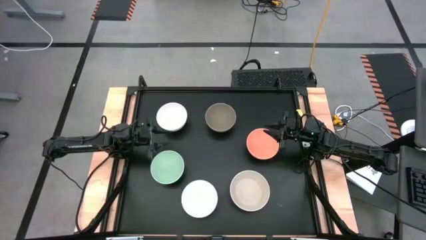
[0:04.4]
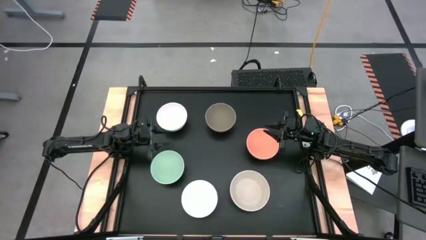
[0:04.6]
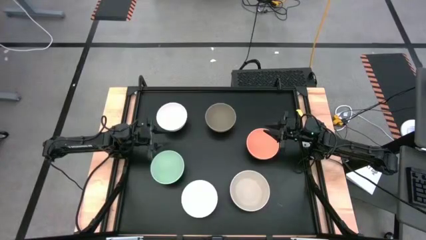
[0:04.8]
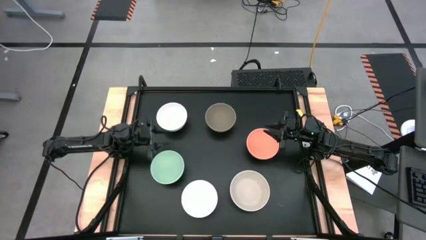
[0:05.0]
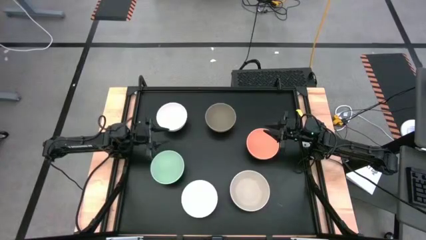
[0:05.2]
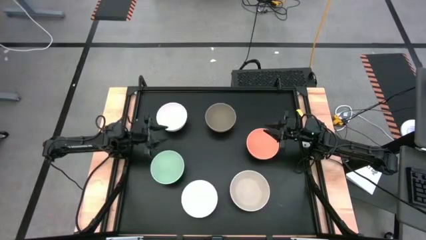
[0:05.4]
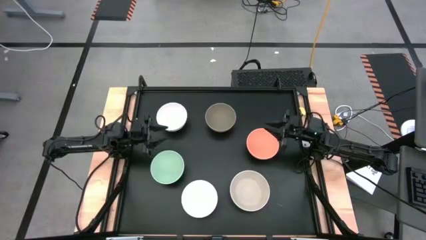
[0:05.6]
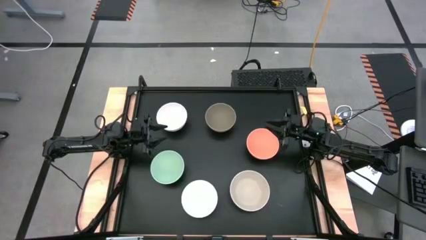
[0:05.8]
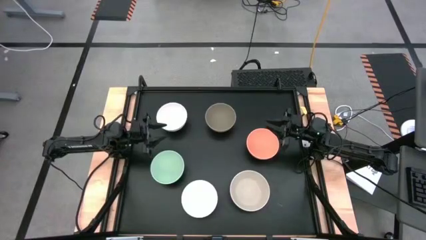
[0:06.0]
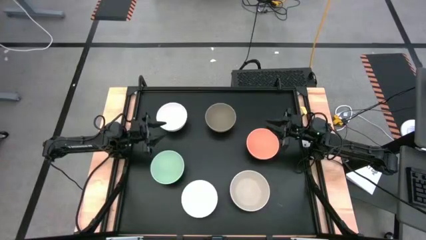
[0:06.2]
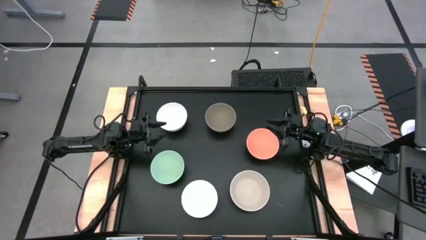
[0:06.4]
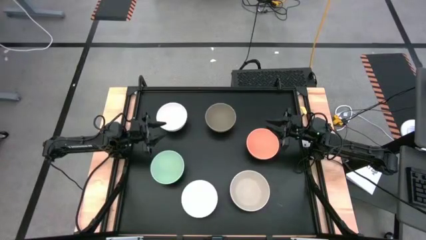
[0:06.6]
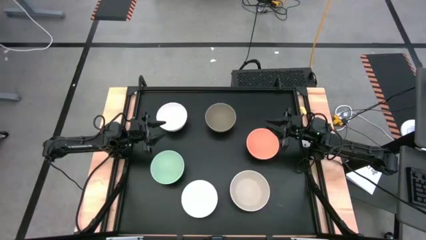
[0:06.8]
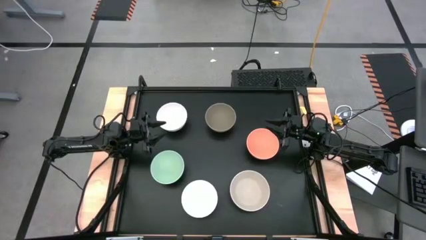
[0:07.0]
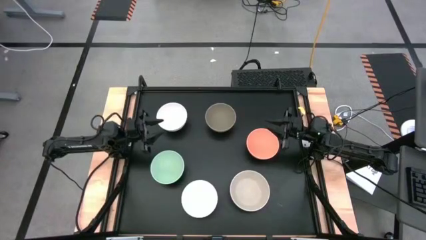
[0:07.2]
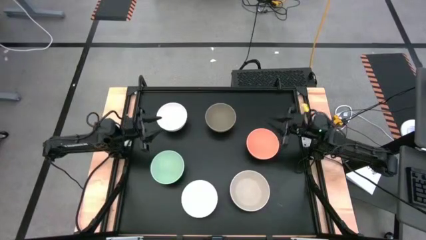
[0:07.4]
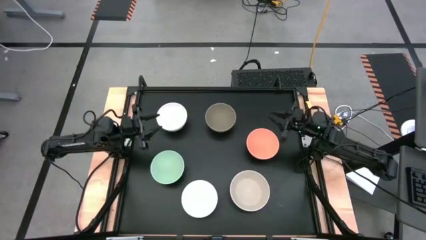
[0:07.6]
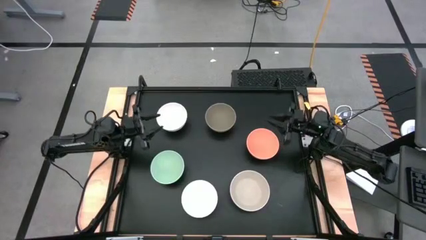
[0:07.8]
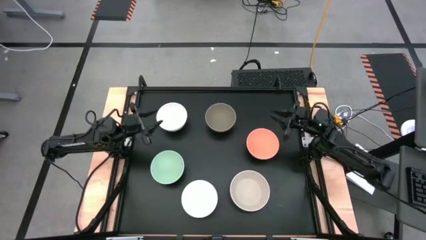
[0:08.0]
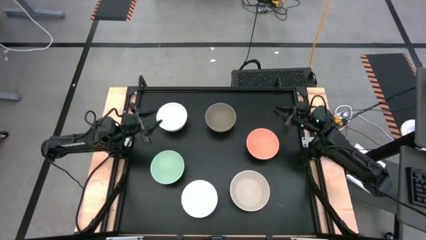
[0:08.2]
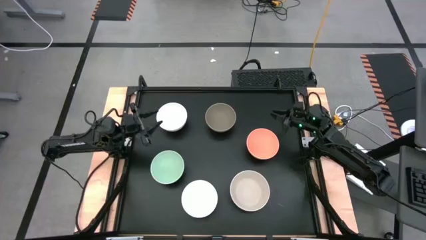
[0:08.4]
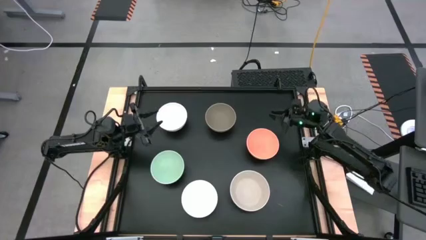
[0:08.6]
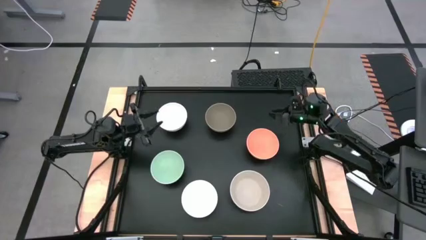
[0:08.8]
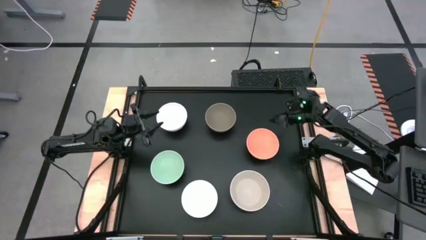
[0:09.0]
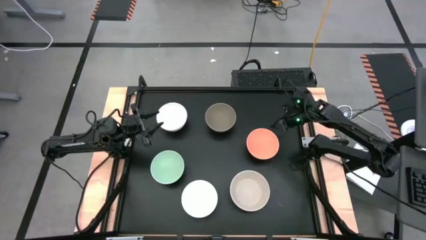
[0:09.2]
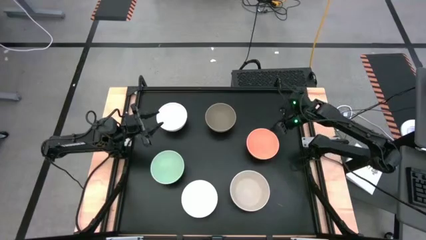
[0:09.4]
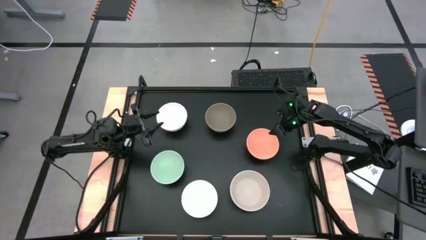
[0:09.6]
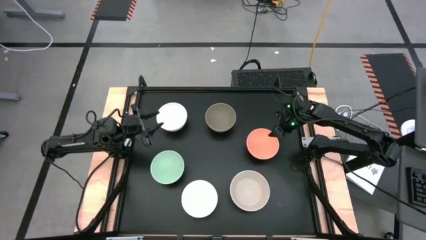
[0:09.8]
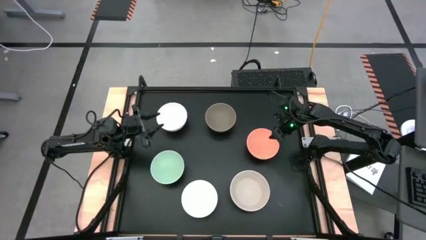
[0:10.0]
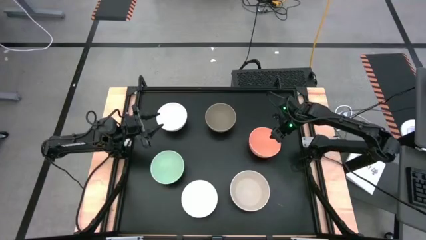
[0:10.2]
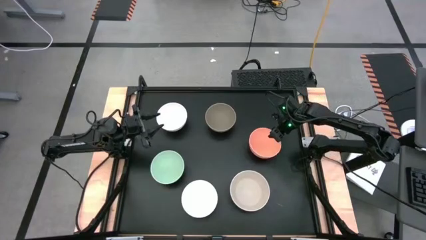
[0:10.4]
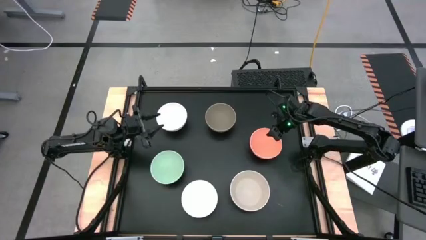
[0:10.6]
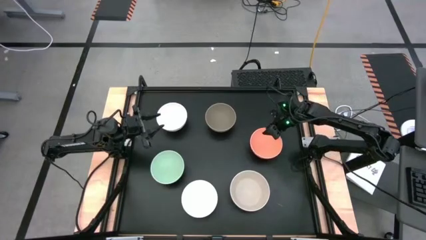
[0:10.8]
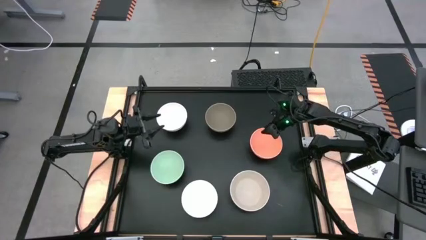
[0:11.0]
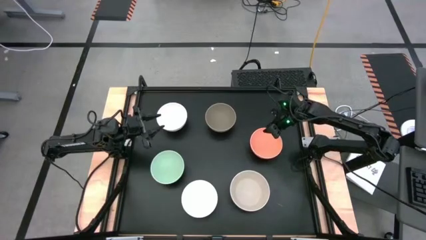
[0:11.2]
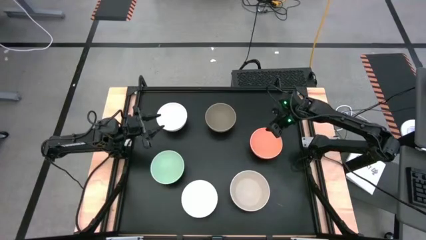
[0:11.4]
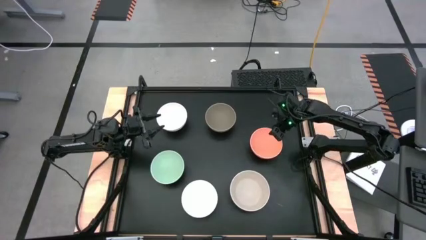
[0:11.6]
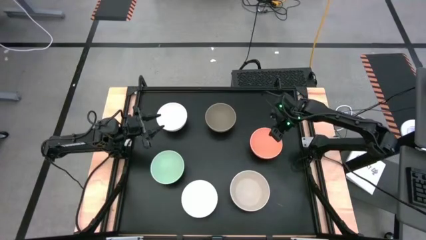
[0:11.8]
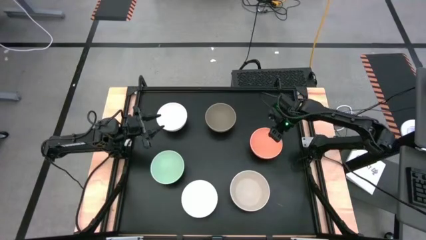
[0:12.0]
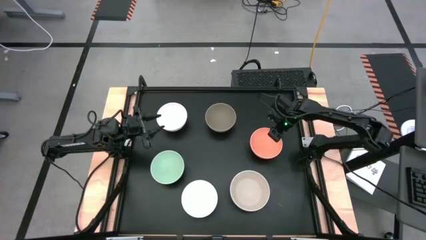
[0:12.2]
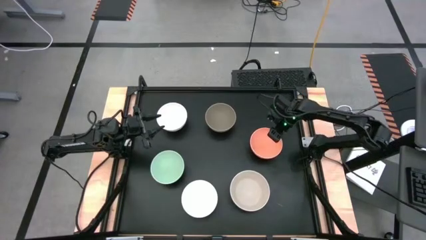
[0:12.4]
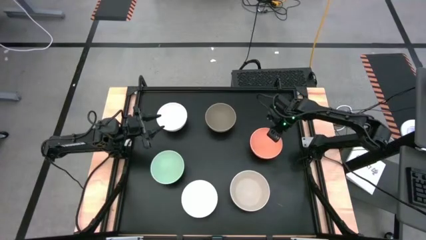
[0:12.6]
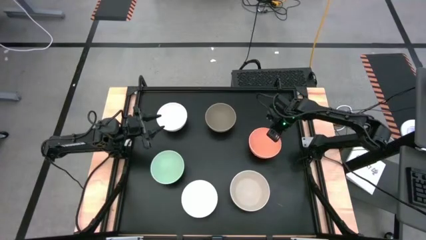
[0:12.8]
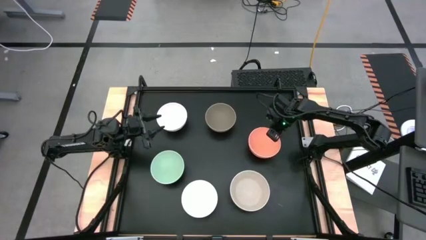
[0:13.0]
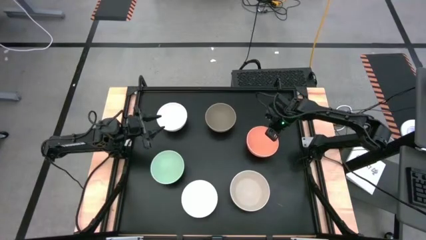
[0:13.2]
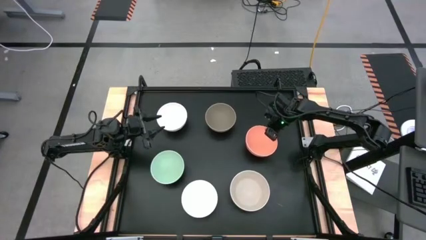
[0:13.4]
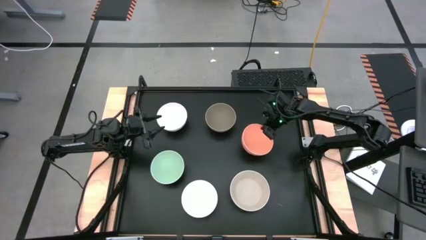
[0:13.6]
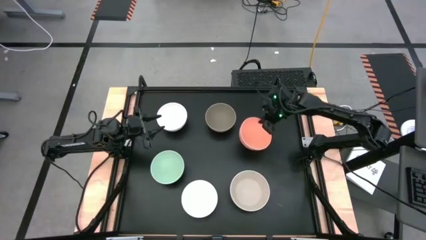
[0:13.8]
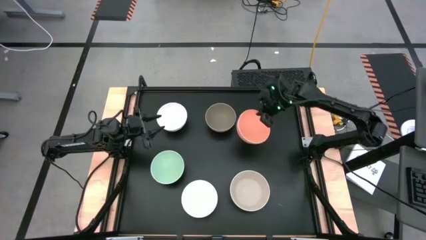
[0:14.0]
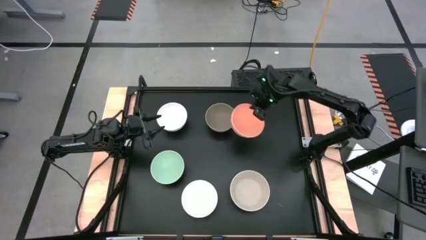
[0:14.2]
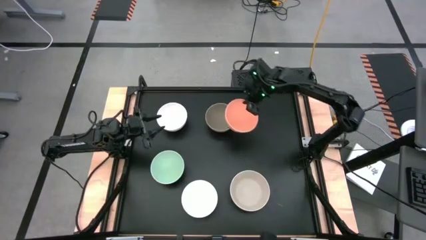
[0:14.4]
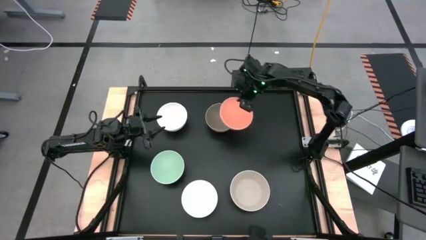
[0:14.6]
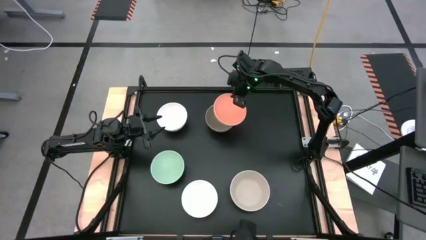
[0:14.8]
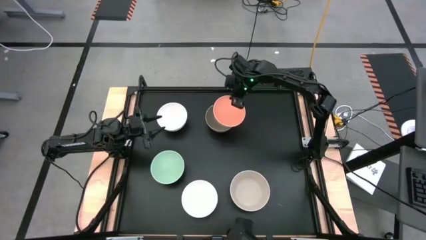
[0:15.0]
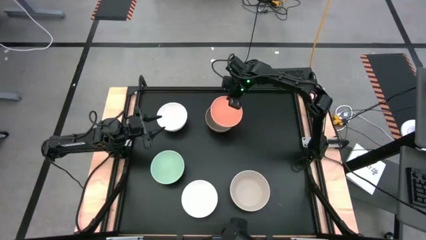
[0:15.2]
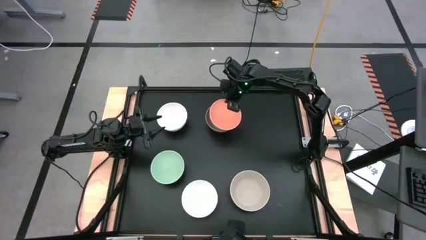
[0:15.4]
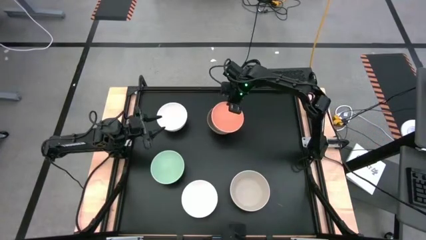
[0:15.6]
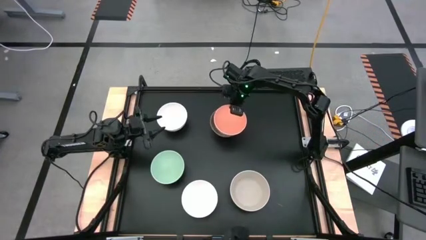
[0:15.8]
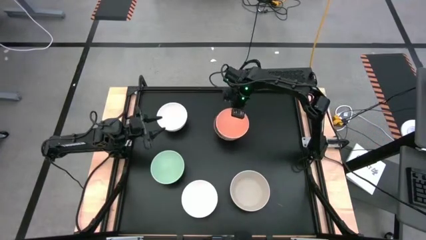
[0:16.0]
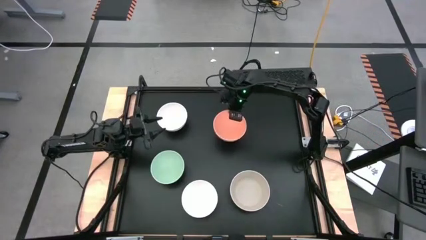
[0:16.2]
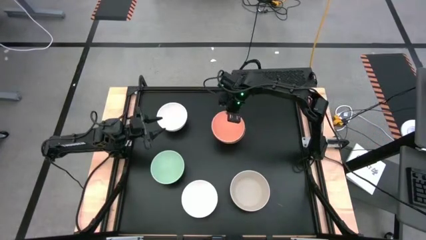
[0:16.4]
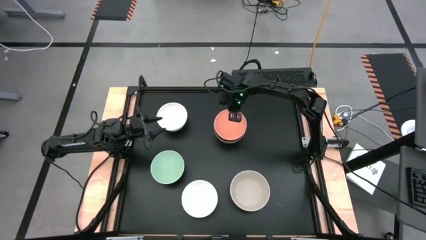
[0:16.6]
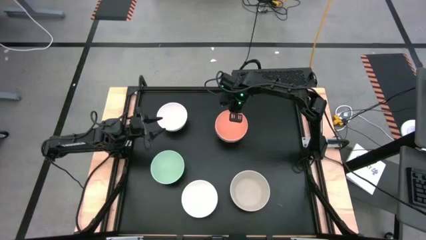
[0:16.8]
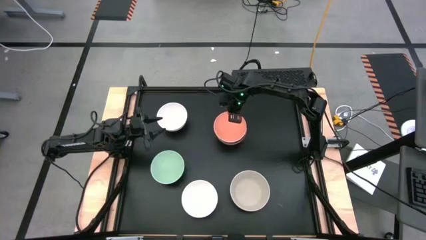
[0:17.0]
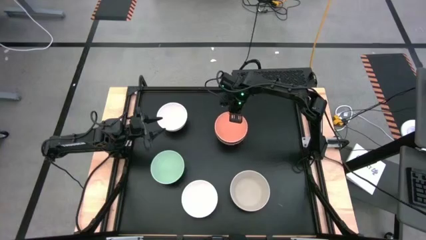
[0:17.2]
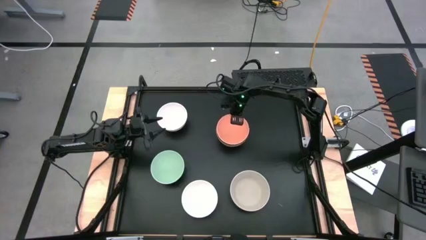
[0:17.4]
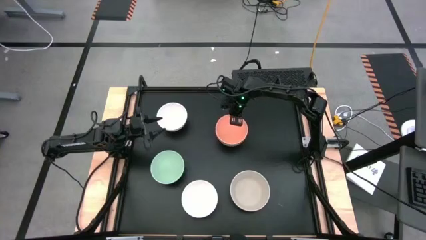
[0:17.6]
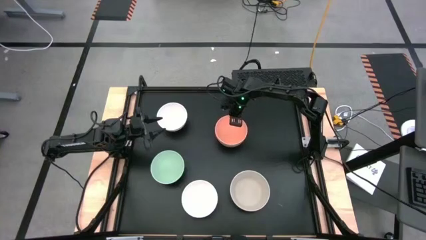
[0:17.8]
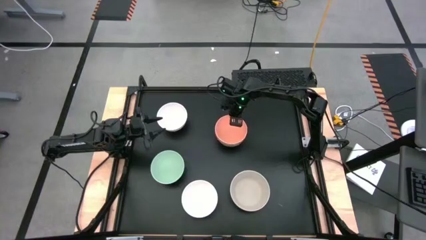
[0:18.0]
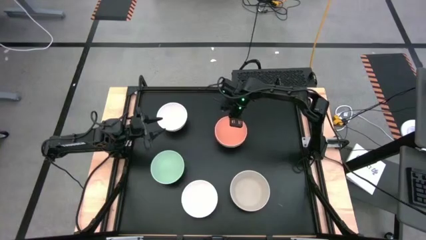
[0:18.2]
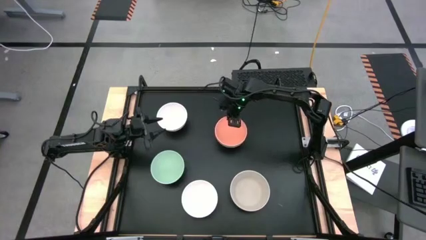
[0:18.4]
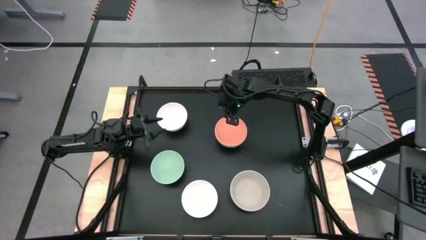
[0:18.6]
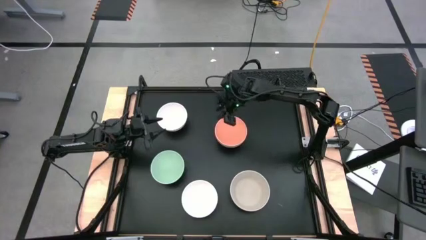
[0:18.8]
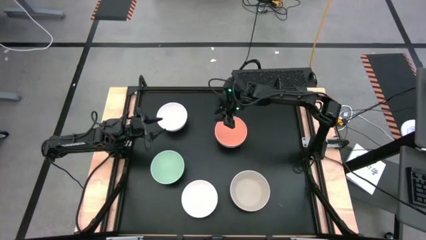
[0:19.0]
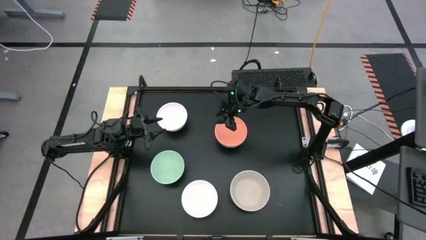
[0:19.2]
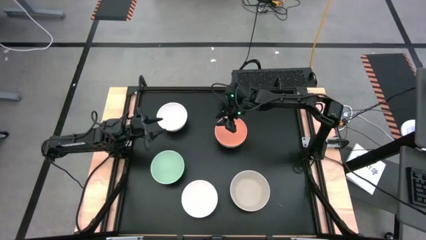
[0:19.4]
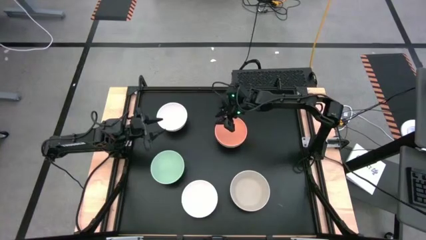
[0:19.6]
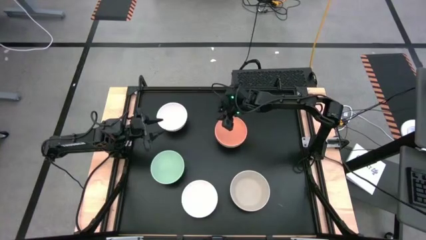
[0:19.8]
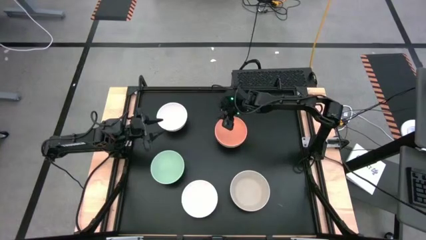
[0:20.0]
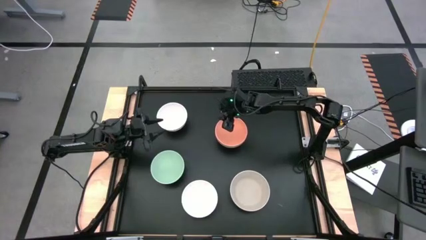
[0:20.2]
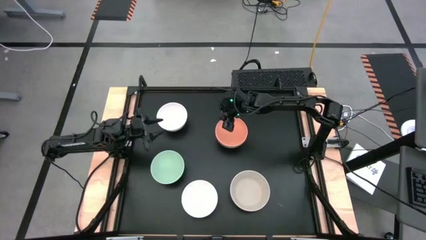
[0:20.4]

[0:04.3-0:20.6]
Task: Nest bowls inside each other
Stack the light orange bowl on top of the light brown bowl
